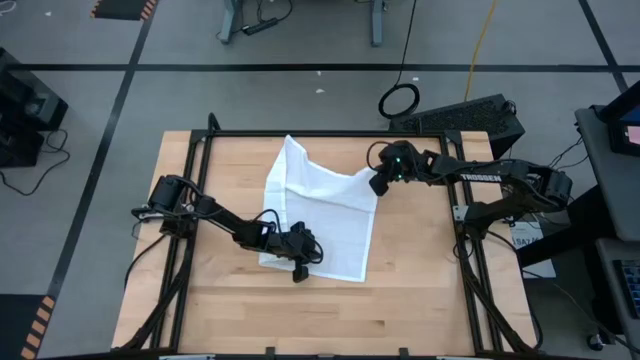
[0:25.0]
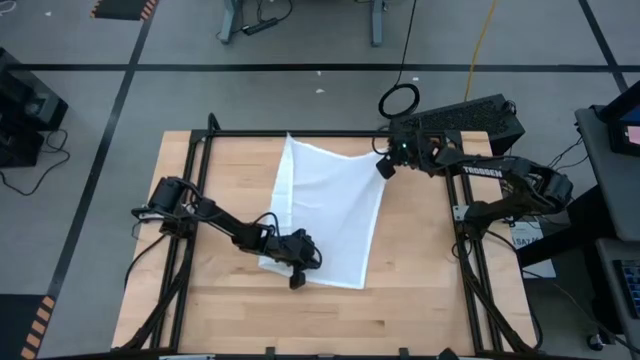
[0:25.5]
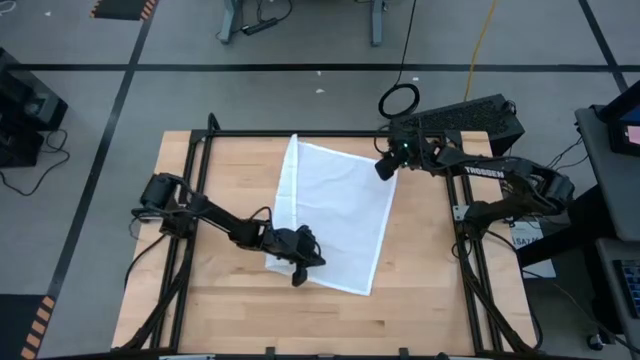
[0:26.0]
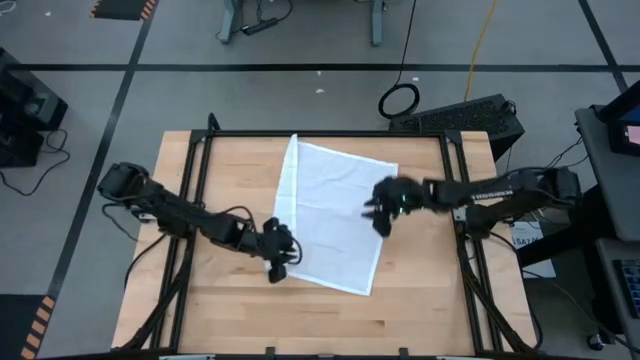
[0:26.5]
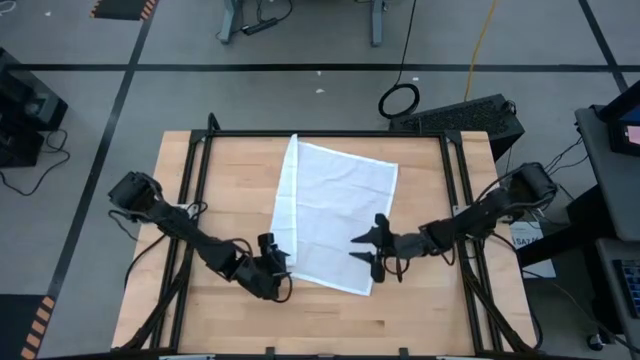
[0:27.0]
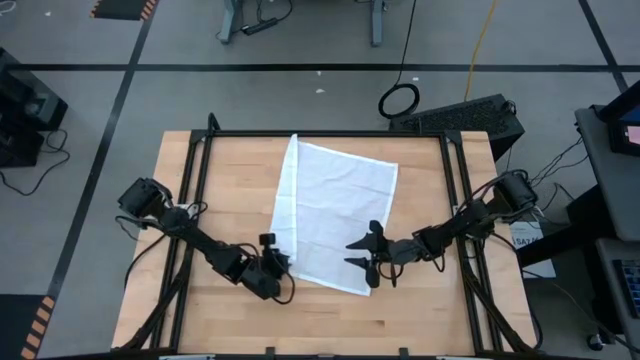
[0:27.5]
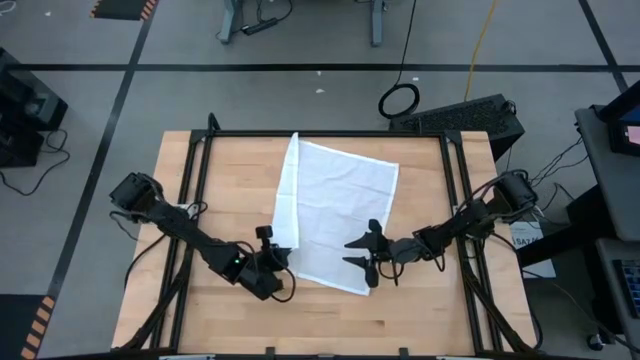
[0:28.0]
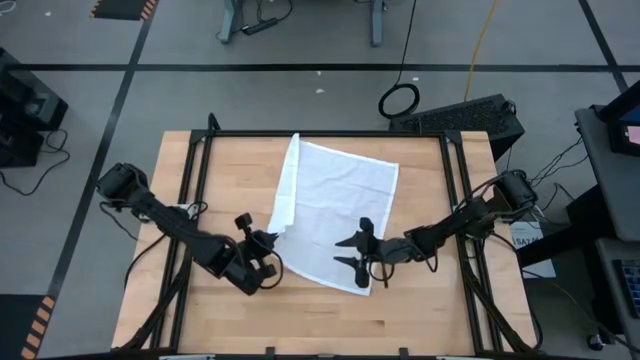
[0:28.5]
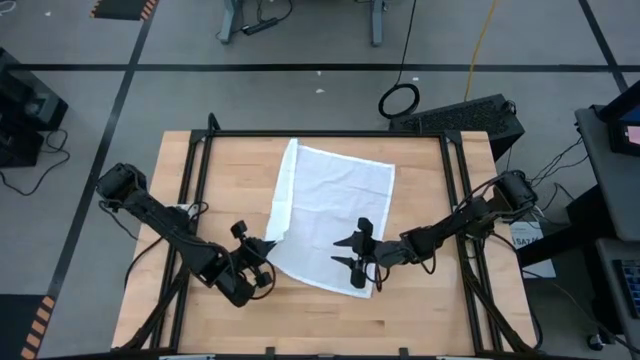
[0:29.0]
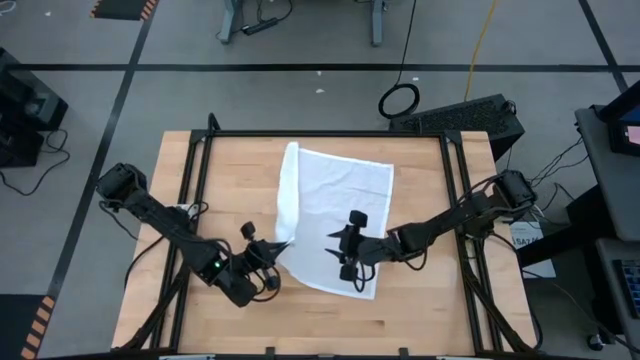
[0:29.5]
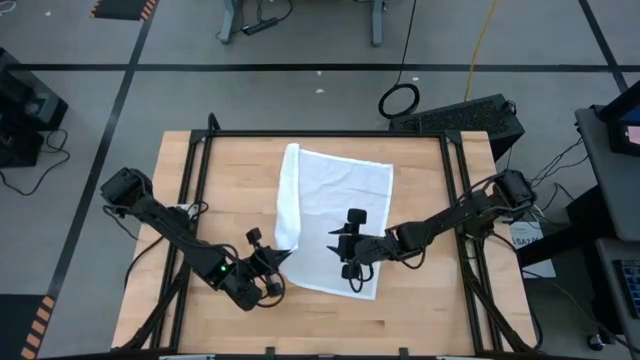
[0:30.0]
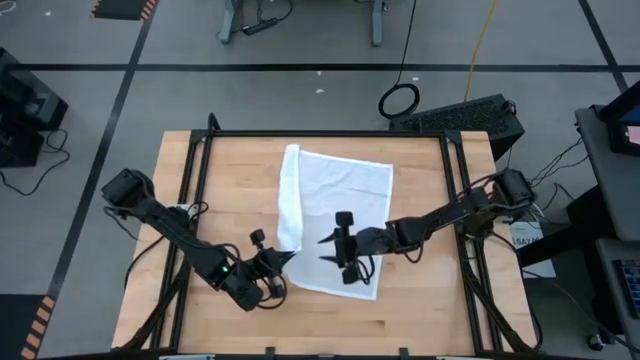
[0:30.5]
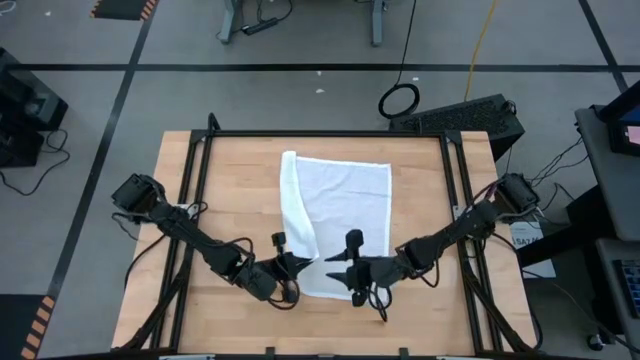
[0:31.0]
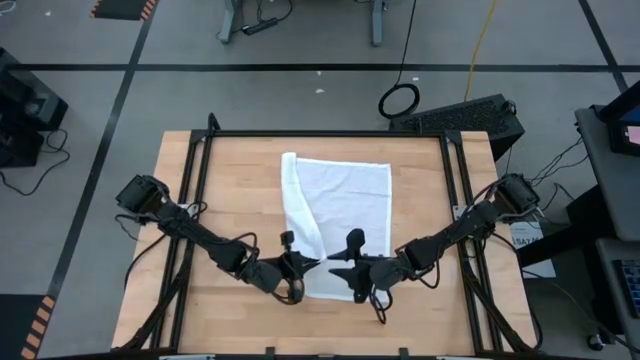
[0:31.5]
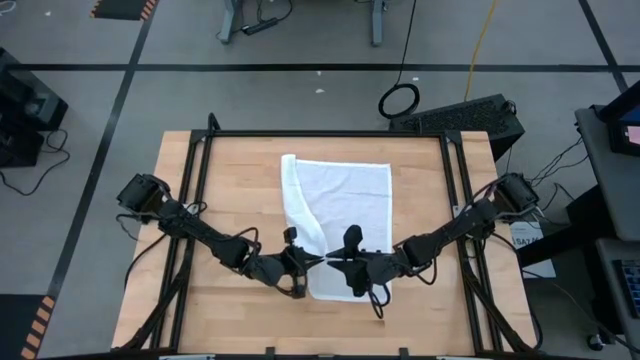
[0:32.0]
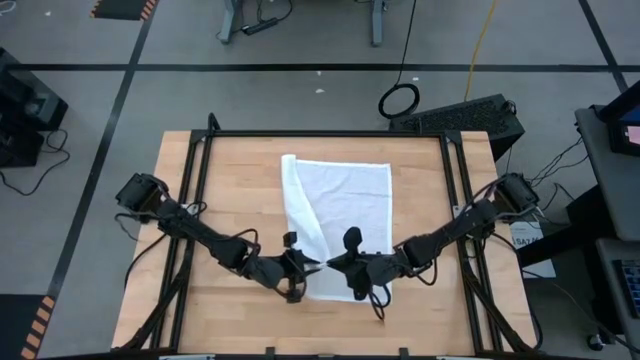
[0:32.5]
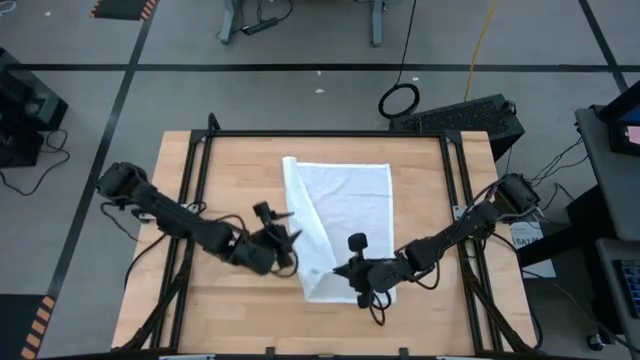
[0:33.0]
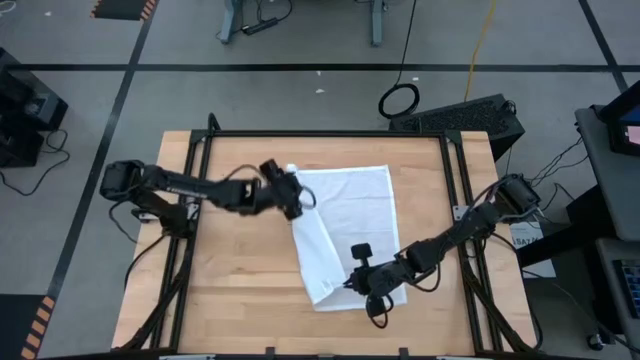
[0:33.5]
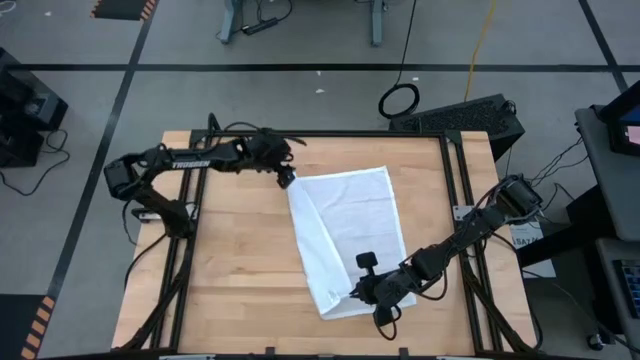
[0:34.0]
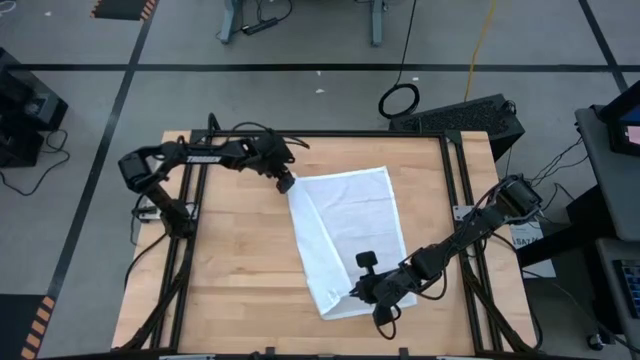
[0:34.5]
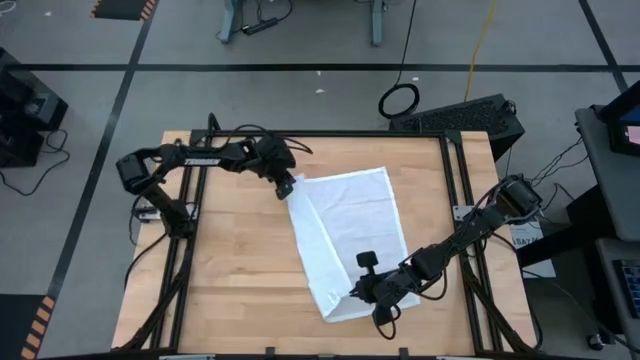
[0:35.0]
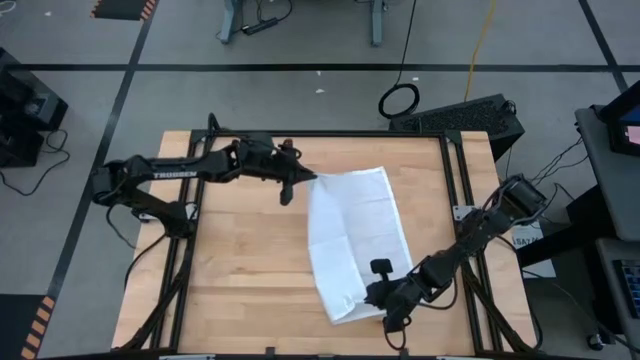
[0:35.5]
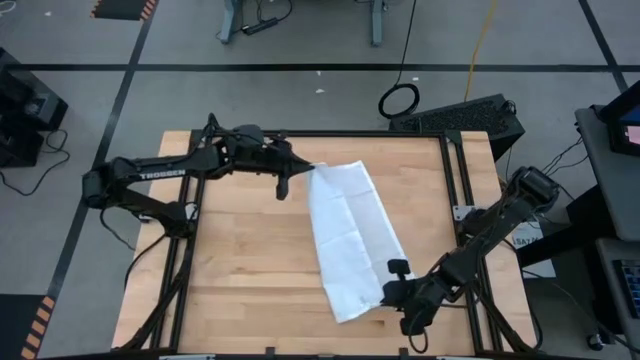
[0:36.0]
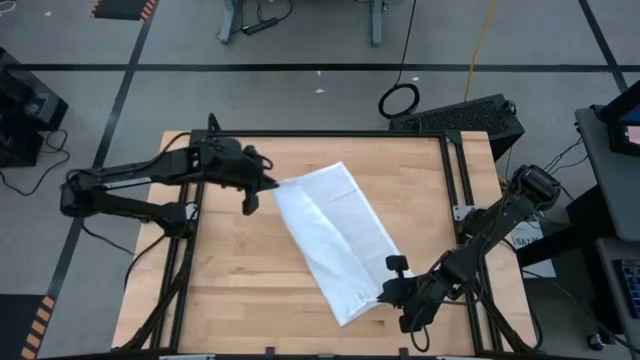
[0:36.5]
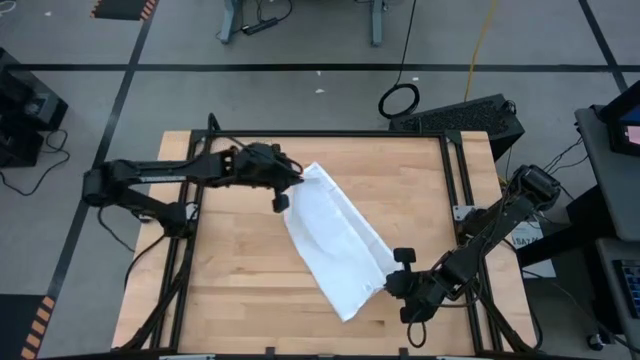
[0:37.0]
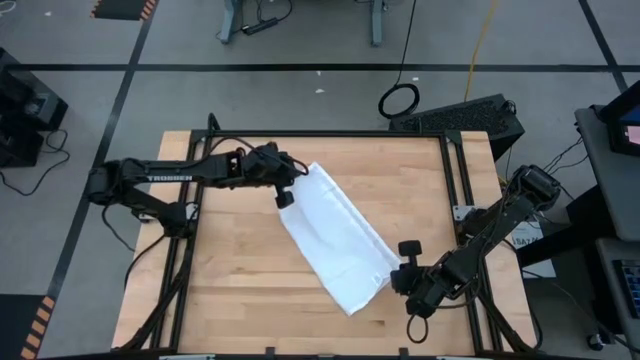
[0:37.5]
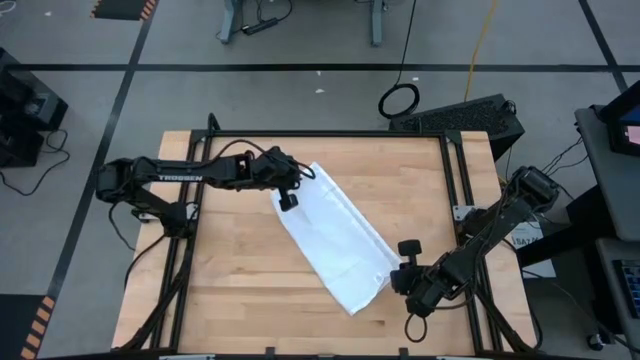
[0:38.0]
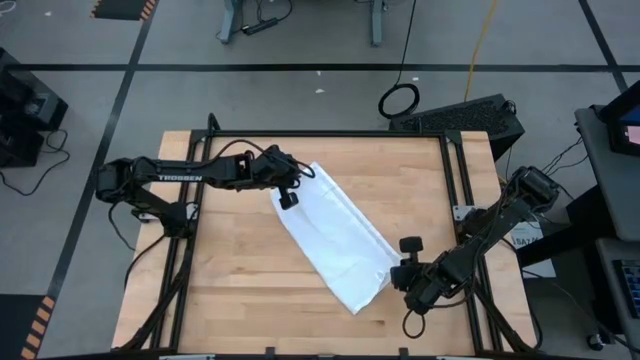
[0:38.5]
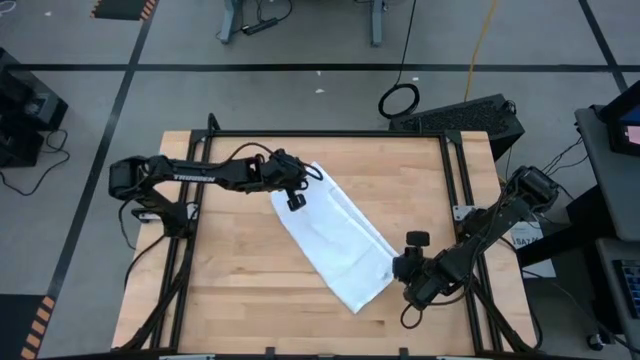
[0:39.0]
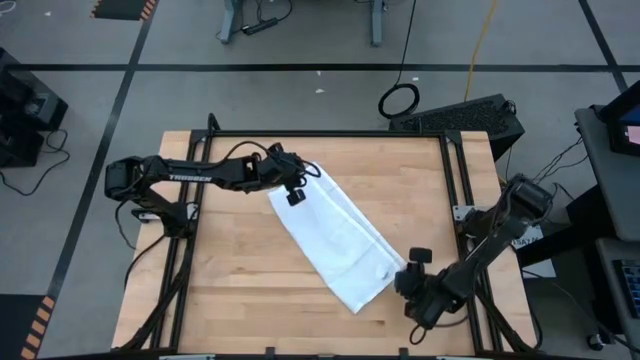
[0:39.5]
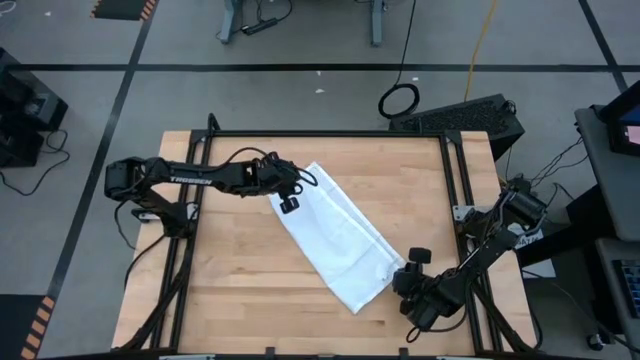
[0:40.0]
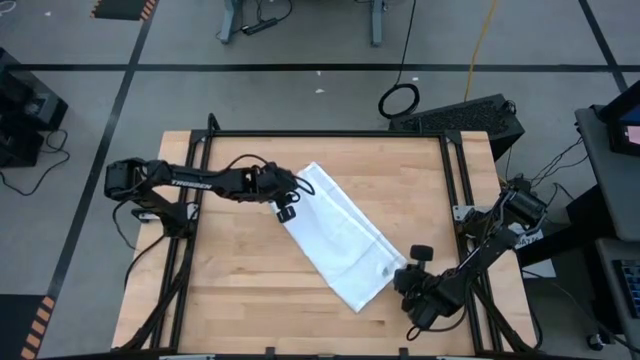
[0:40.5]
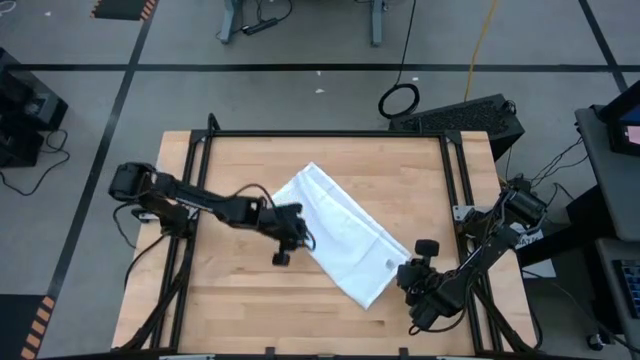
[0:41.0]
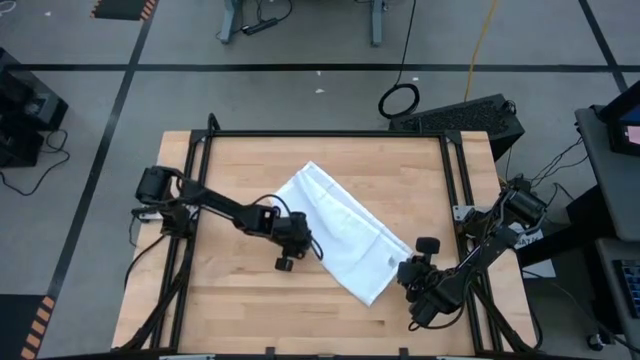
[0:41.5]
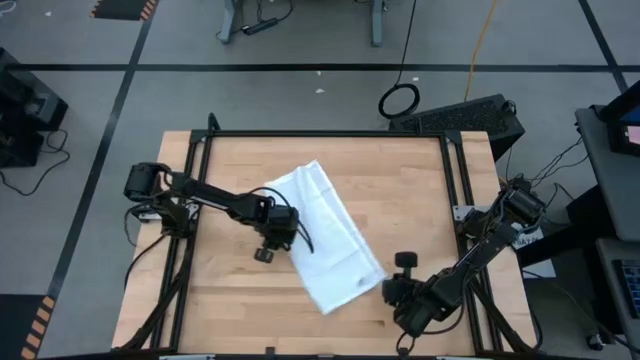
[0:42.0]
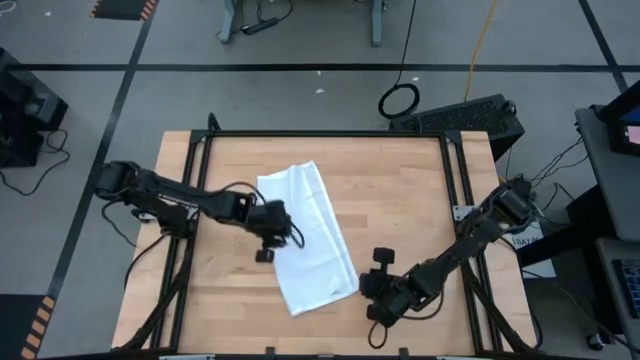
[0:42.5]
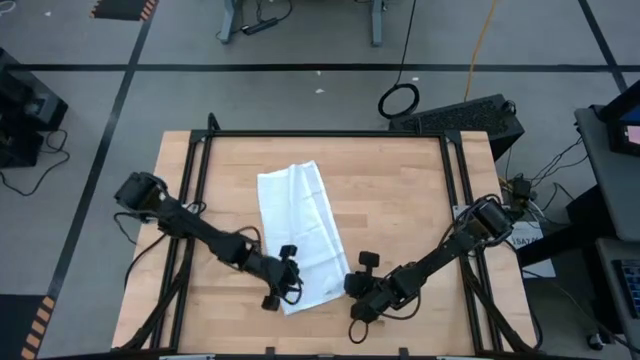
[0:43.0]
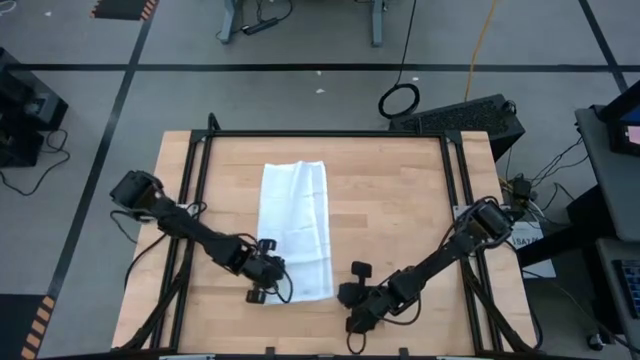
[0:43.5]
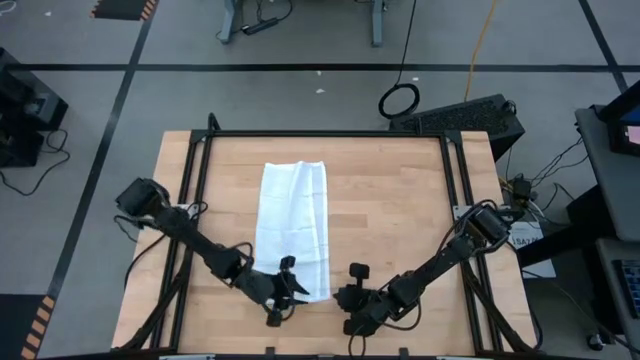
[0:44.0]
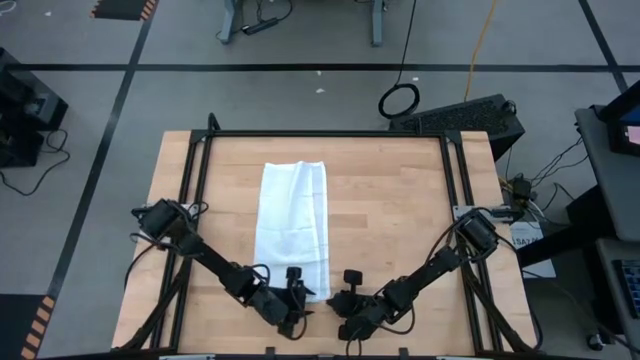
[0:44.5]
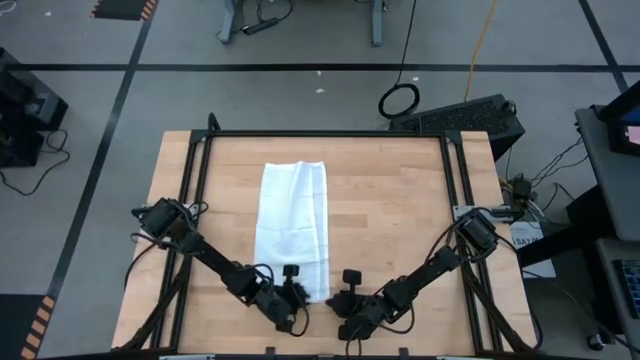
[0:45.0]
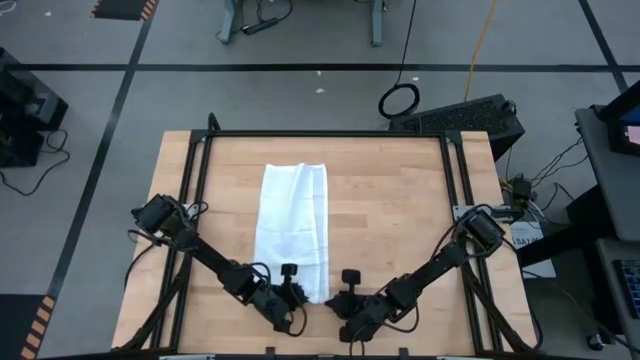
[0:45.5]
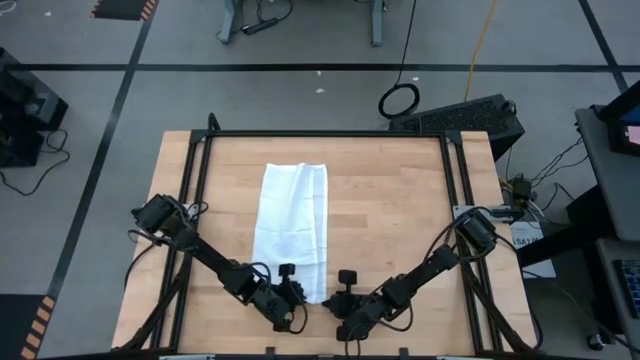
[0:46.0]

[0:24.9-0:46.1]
Task: Roll napkin
Fold the white table napkin
